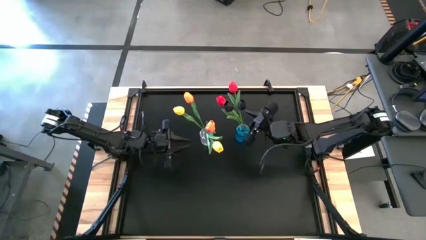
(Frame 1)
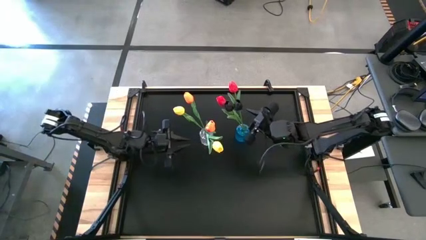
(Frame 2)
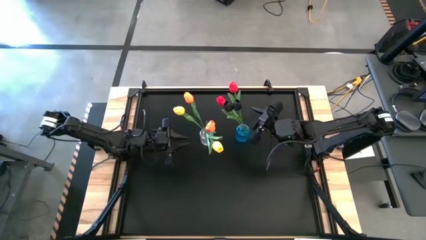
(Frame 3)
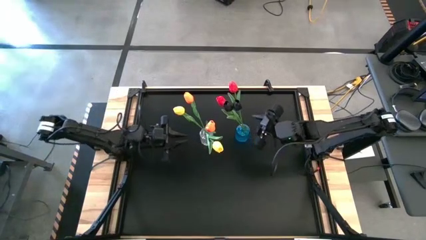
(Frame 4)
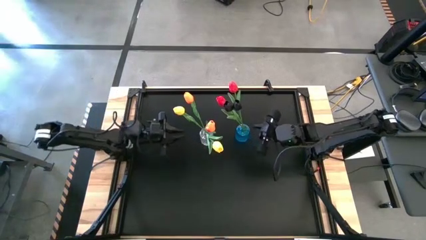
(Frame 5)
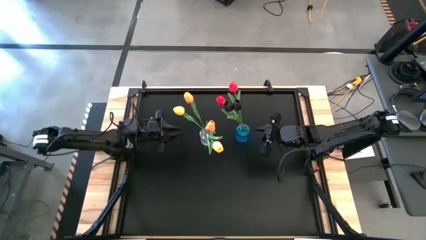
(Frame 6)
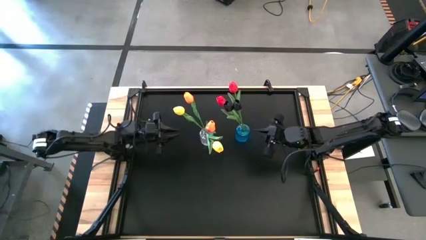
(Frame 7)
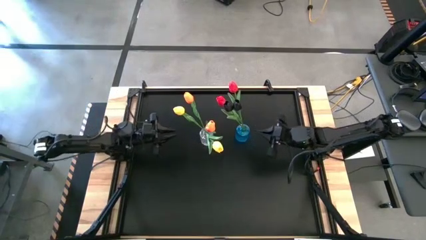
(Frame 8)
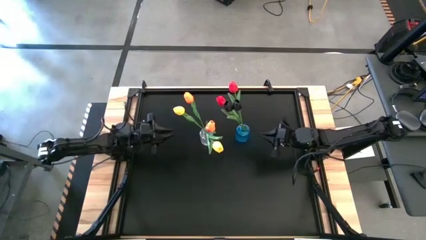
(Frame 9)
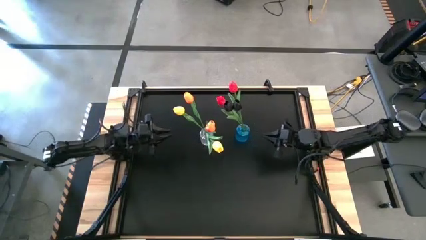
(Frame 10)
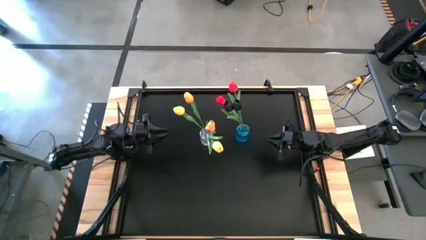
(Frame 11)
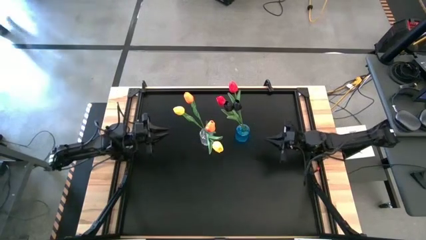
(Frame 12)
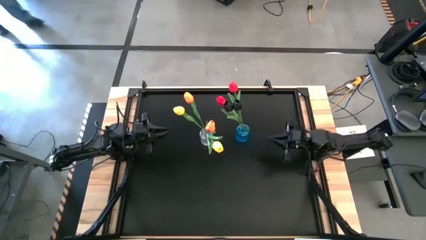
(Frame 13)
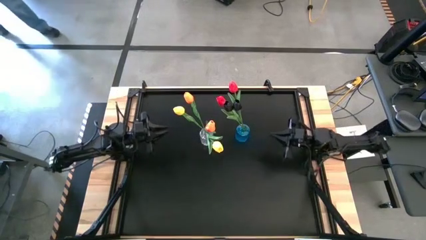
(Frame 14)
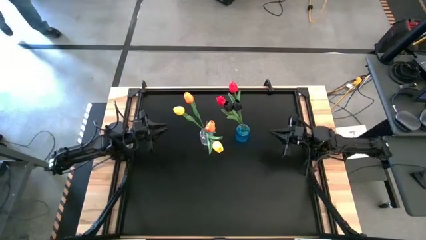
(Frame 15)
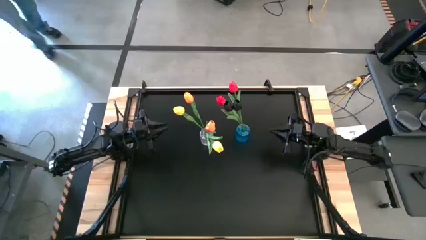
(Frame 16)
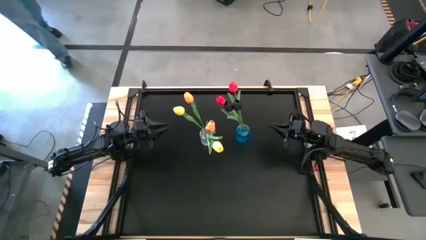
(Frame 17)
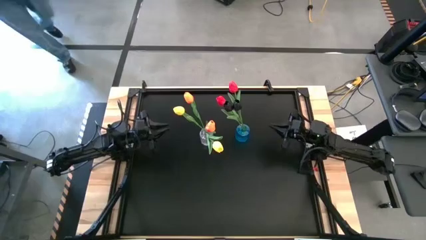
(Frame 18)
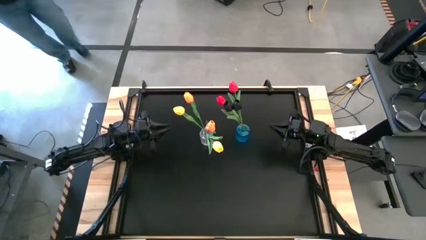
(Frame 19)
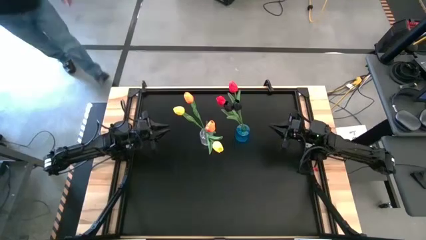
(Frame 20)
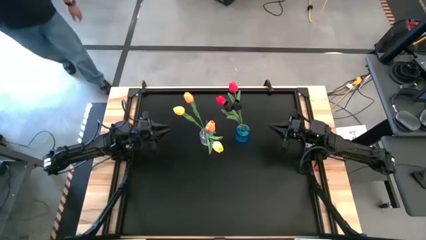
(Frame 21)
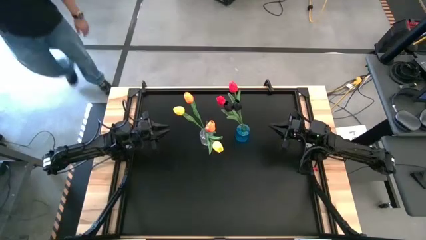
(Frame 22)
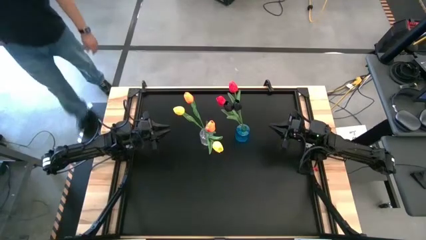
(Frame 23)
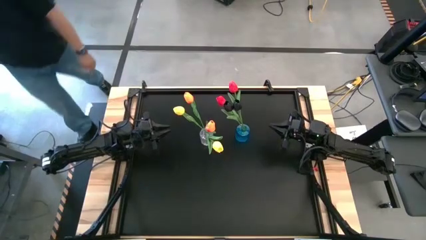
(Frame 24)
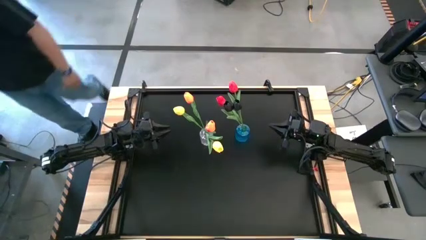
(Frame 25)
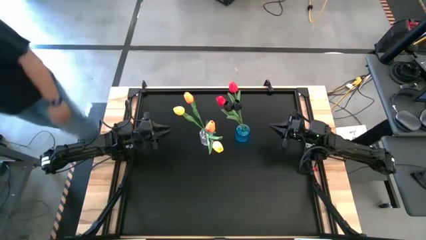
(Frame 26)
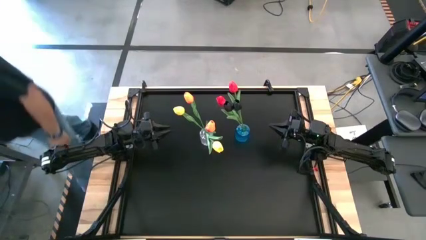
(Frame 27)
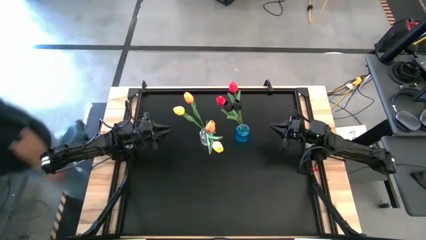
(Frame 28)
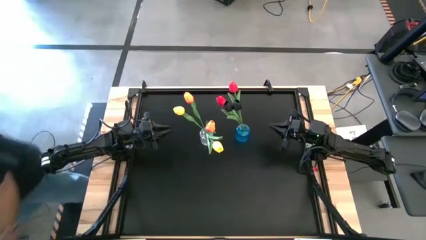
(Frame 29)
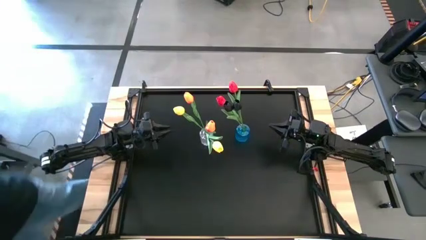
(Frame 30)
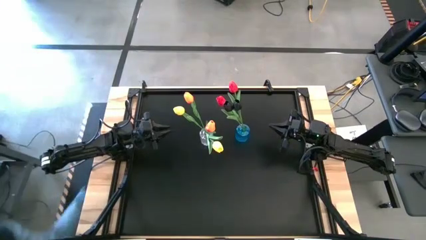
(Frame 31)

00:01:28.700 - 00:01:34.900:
Task: Sort flowers into vase by color
Return to Home Position

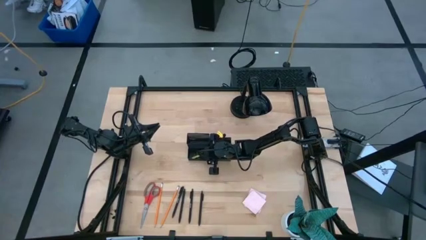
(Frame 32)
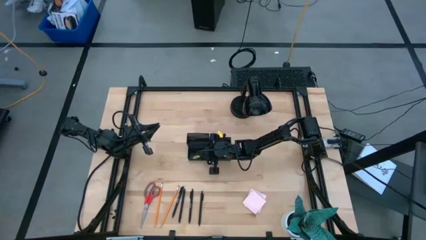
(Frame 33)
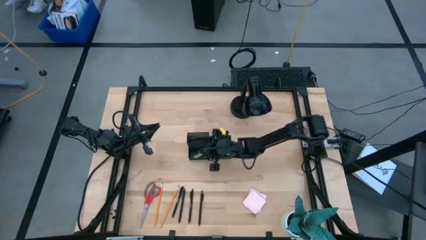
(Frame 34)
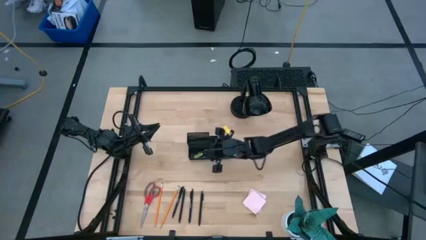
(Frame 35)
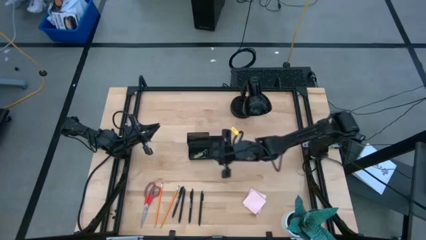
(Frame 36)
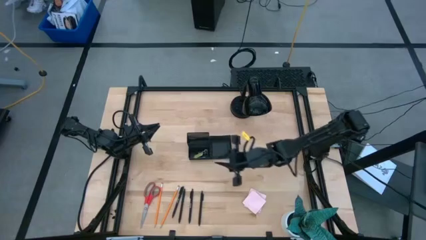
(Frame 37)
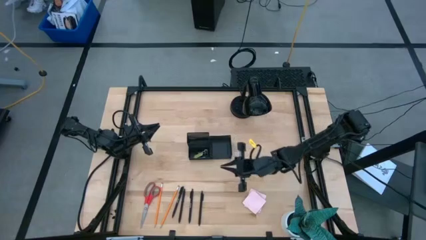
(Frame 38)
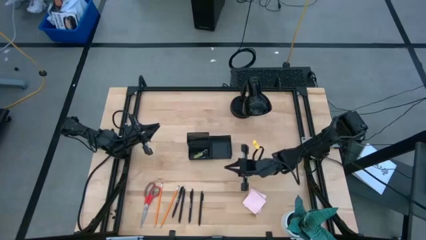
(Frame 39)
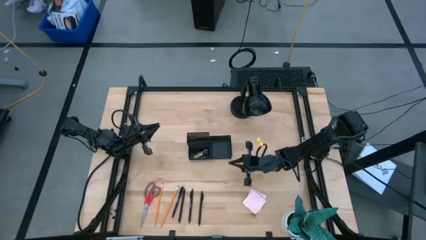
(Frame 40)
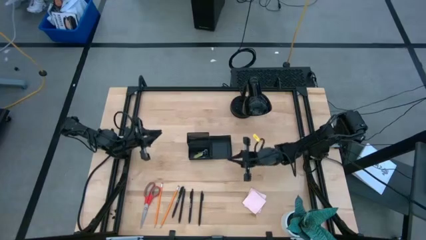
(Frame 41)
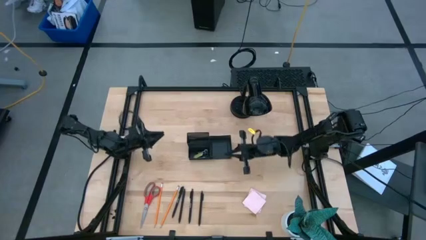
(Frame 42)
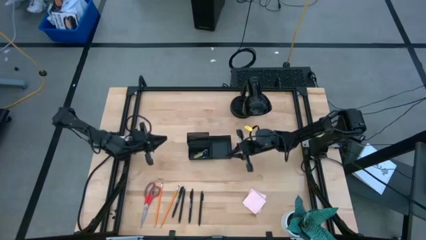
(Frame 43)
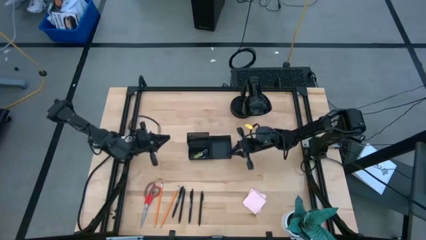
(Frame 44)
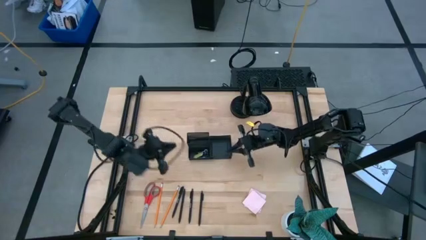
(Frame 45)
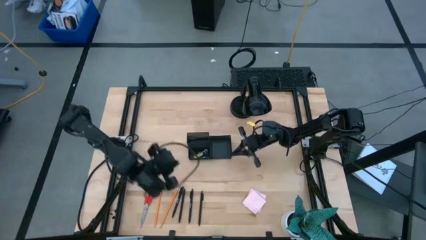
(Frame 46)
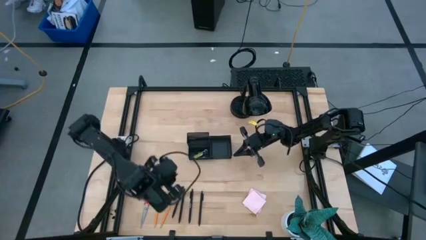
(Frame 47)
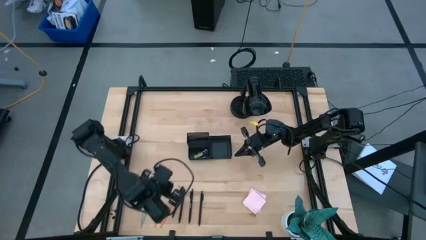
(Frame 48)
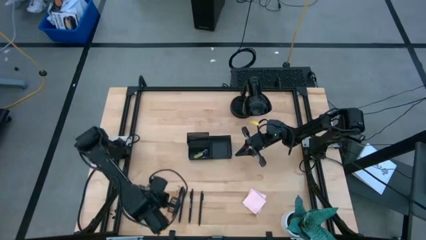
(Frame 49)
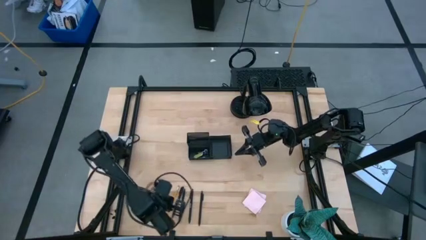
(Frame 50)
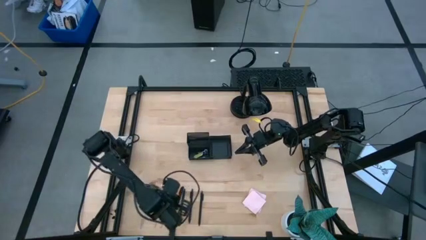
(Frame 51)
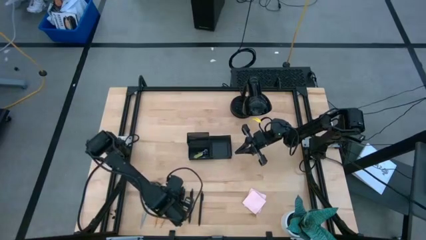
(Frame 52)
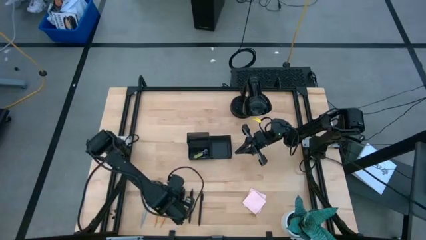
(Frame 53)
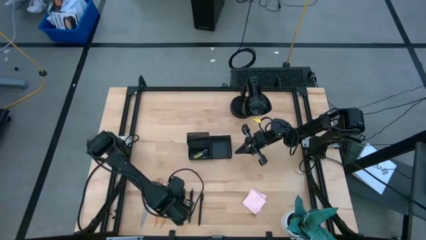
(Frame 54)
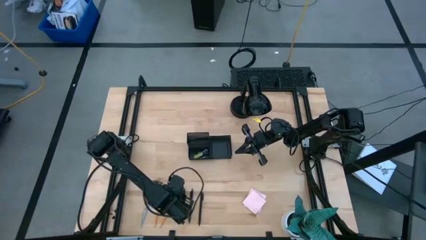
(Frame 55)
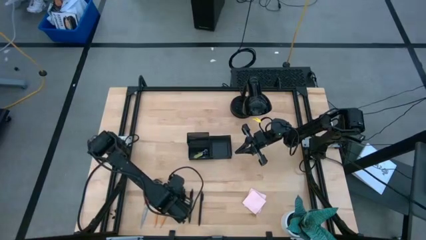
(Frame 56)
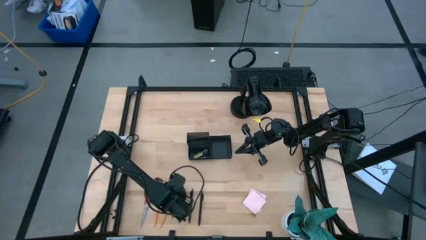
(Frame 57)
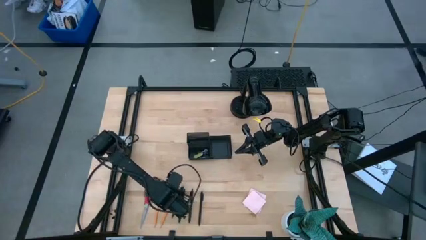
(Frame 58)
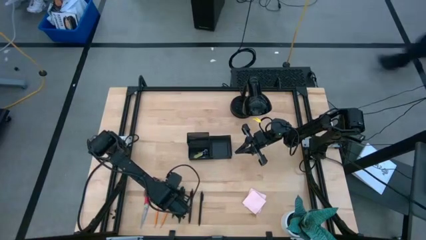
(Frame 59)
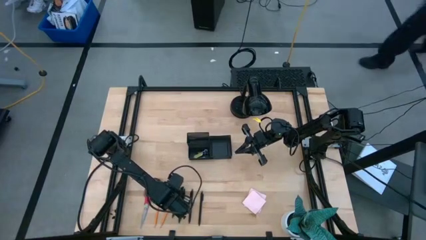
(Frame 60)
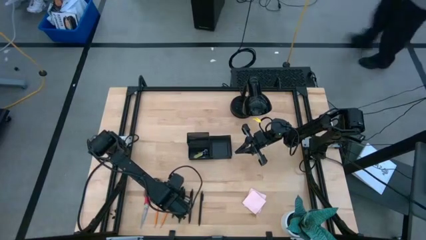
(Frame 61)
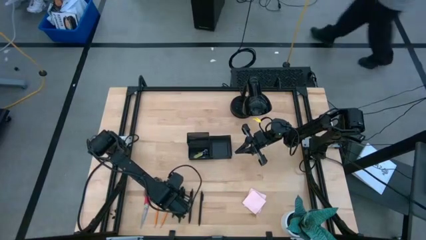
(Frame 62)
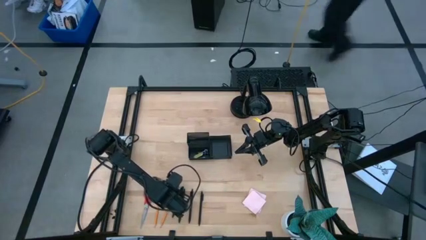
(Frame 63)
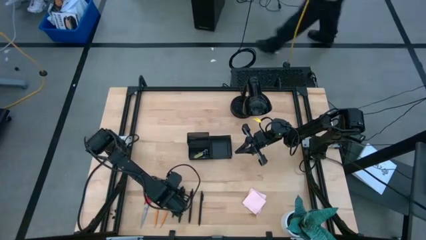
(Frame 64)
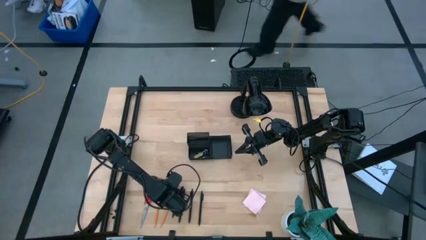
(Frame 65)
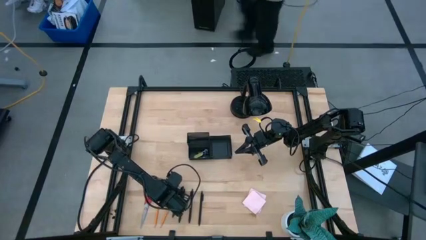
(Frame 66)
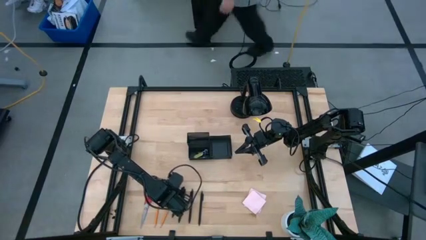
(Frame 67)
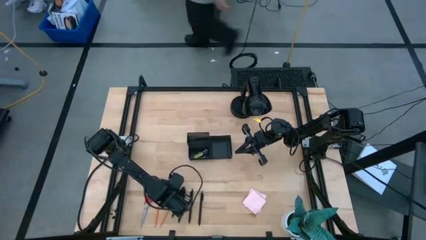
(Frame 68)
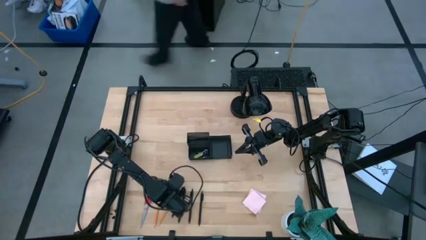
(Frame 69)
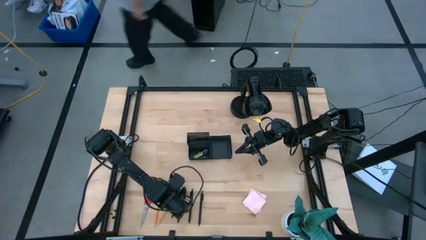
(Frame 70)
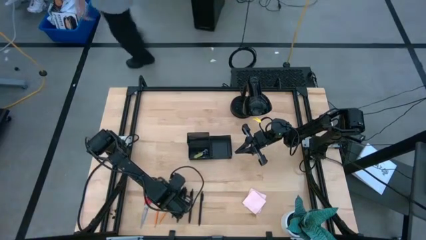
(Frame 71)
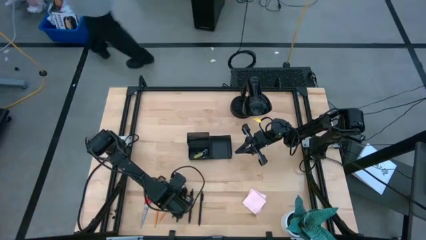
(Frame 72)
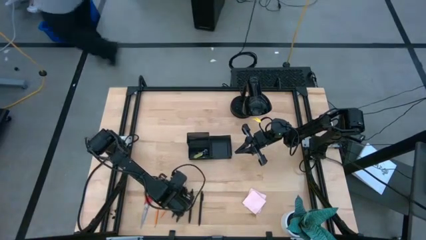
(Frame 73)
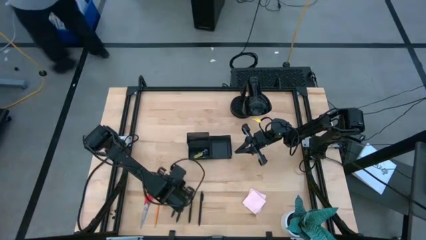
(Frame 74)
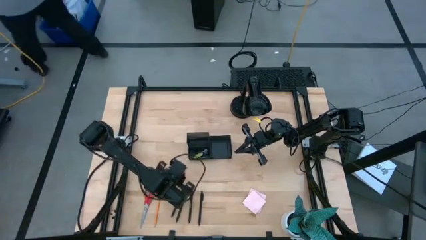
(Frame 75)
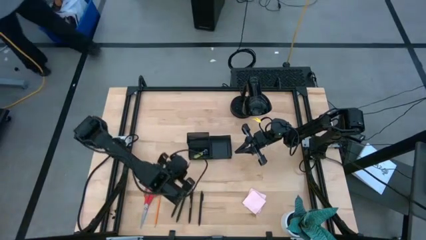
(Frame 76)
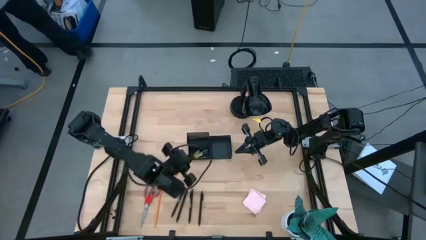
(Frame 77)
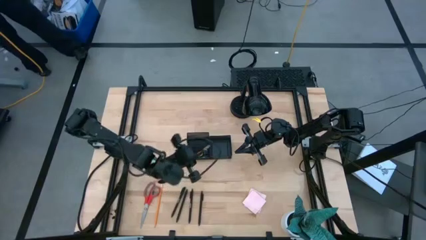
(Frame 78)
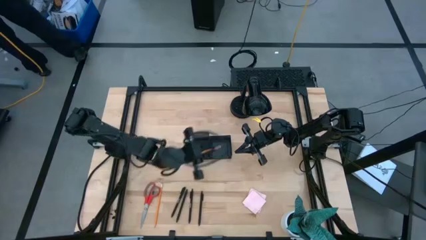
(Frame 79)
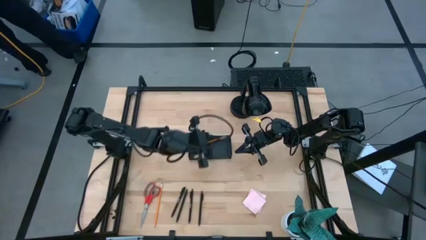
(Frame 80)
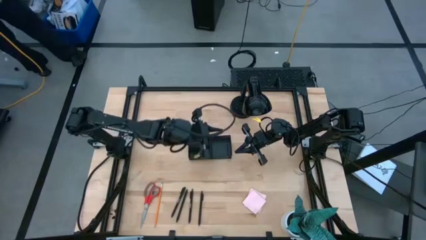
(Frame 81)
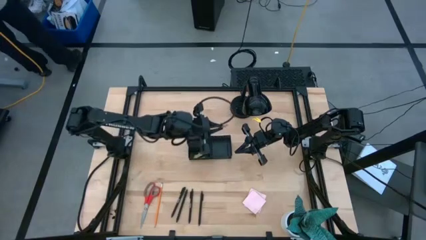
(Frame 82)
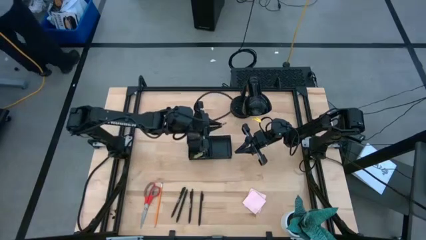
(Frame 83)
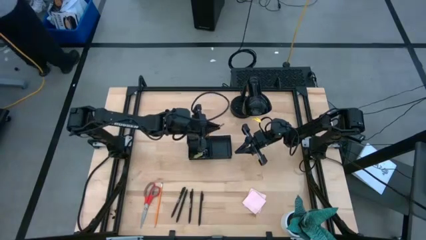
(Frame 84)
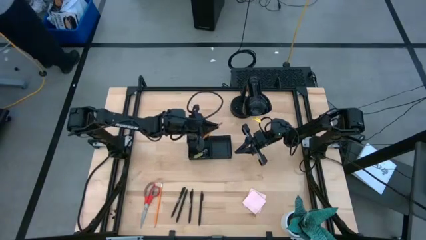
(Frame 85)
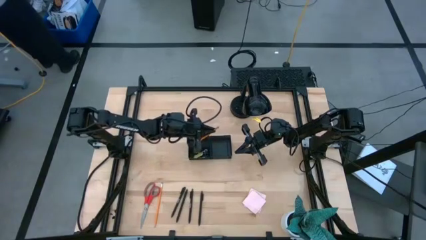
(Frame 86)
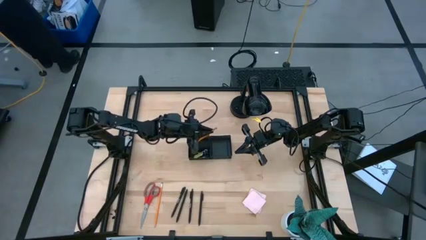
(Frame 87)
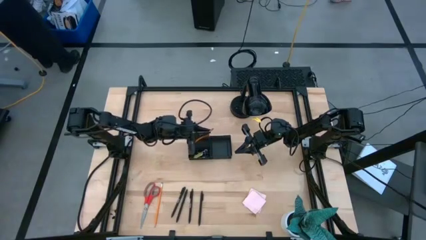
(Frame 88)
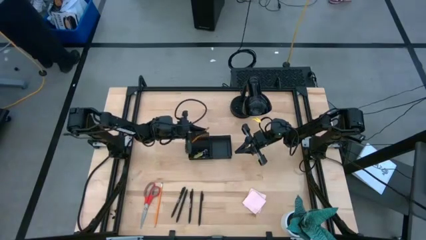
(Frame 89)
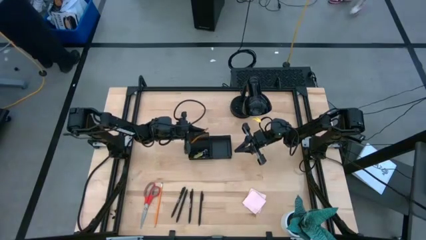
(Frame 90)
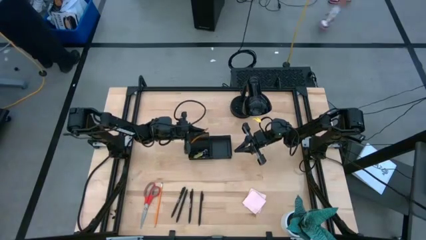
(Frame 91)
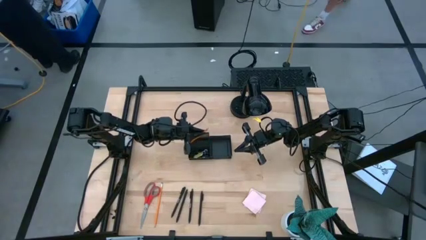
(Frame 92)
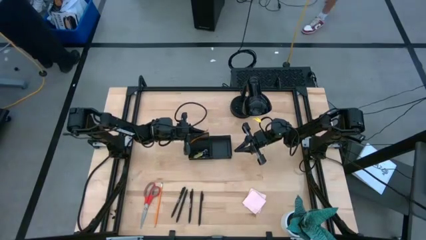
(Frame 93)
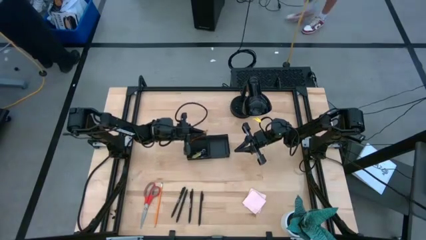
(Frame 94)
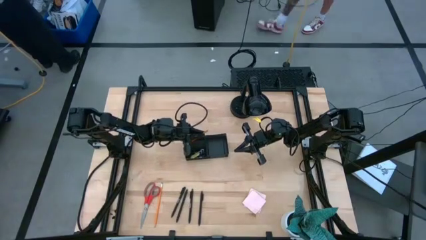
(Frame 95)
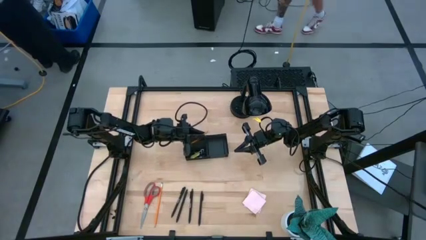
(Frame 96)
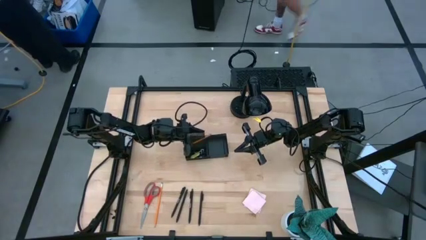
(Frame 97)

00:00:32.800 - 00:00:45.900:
Task: Pick and place office supplies into organizer
Put the orange pencil into the black desk organizer
